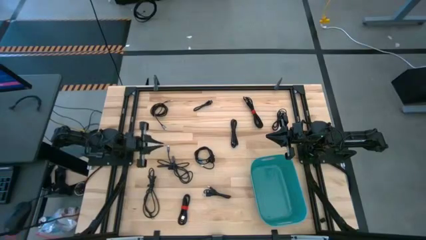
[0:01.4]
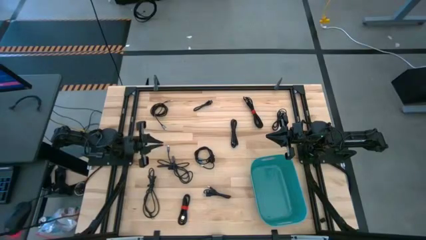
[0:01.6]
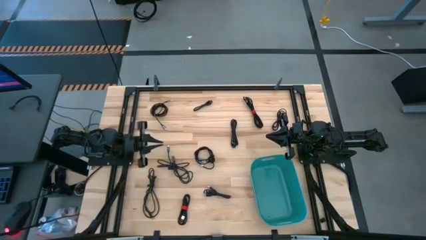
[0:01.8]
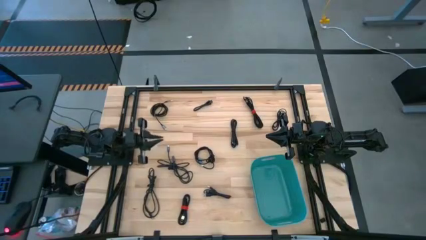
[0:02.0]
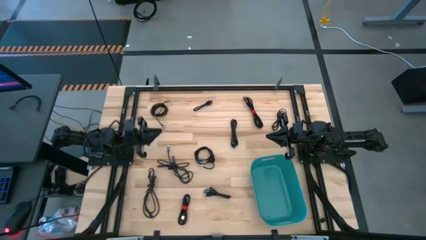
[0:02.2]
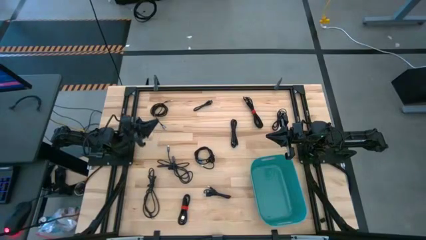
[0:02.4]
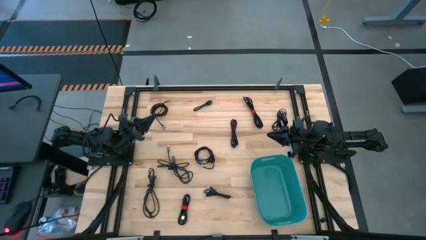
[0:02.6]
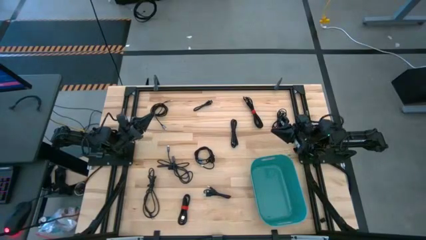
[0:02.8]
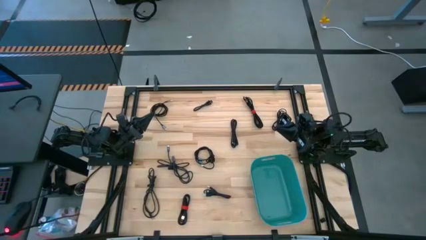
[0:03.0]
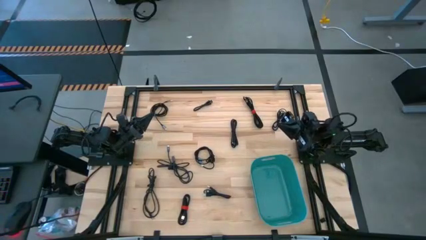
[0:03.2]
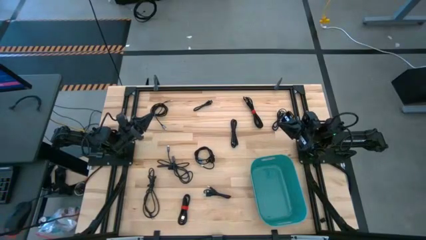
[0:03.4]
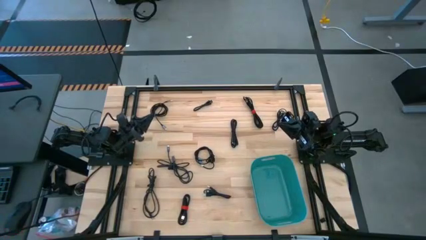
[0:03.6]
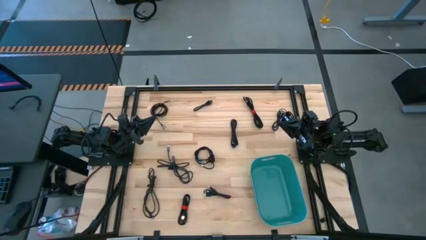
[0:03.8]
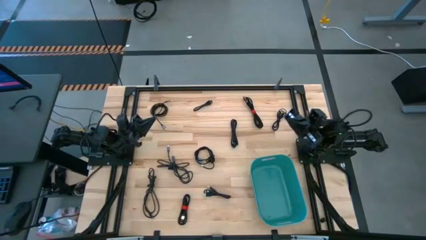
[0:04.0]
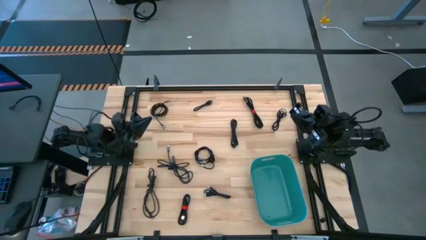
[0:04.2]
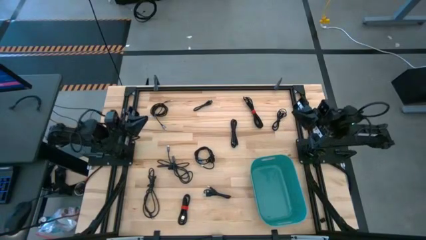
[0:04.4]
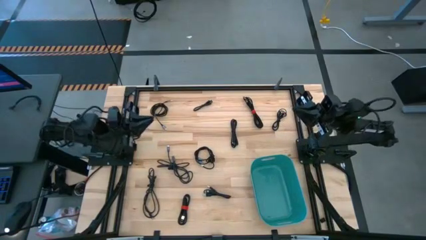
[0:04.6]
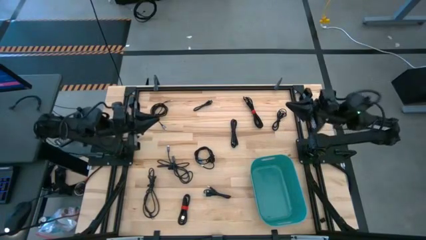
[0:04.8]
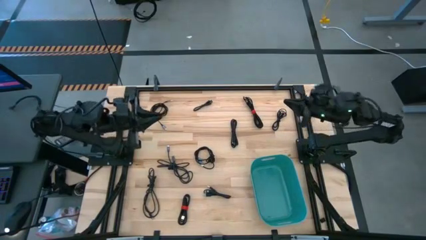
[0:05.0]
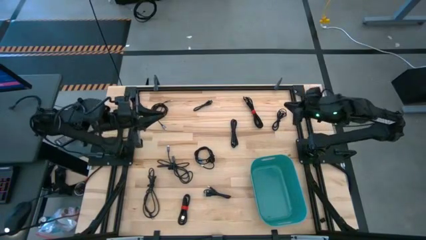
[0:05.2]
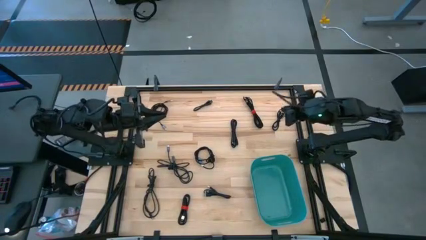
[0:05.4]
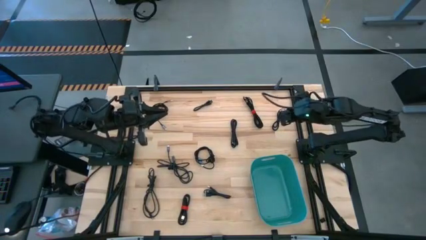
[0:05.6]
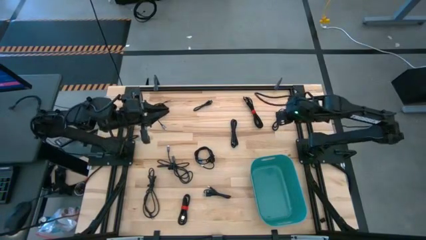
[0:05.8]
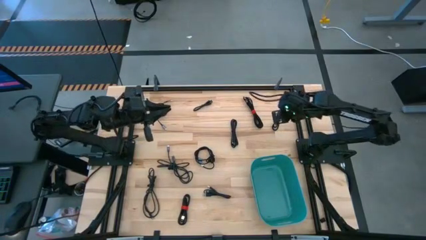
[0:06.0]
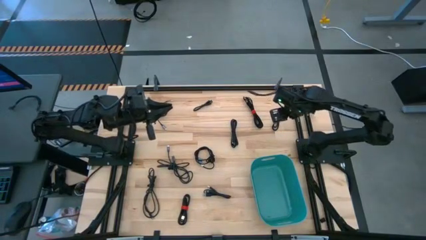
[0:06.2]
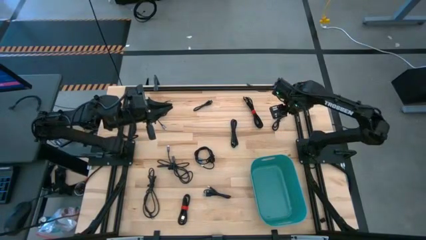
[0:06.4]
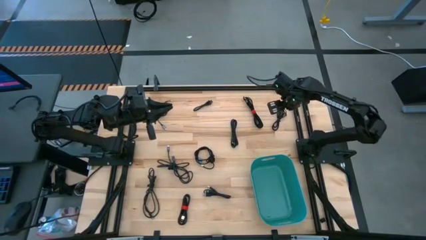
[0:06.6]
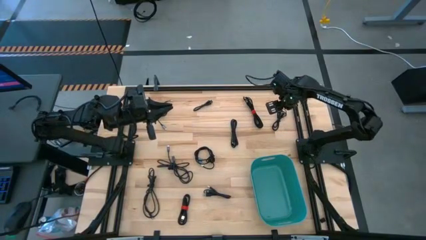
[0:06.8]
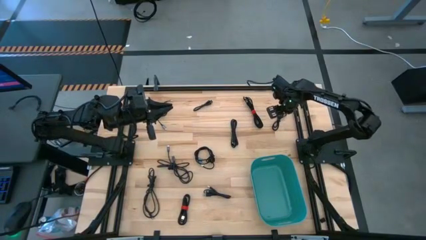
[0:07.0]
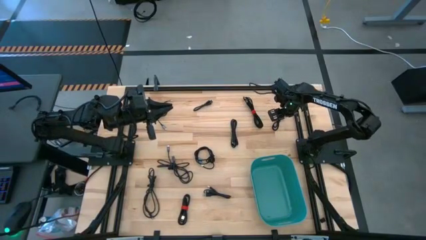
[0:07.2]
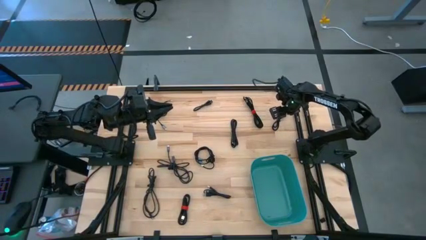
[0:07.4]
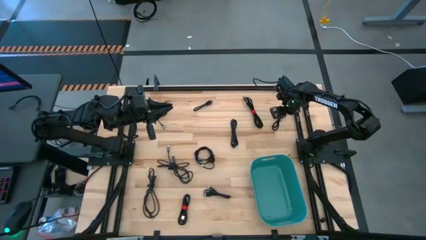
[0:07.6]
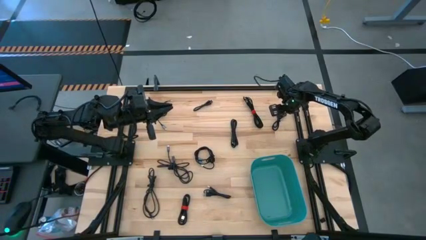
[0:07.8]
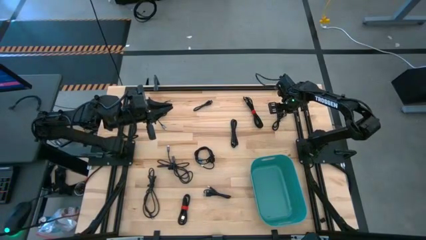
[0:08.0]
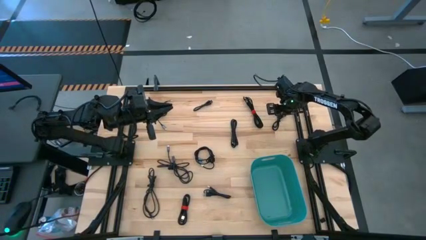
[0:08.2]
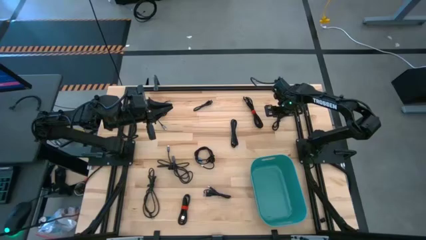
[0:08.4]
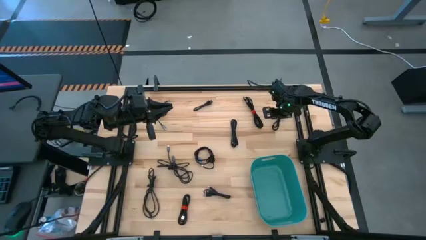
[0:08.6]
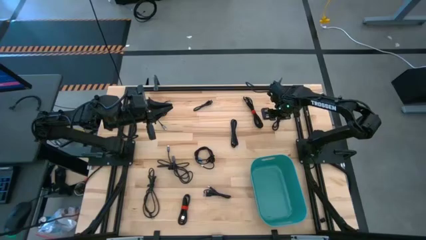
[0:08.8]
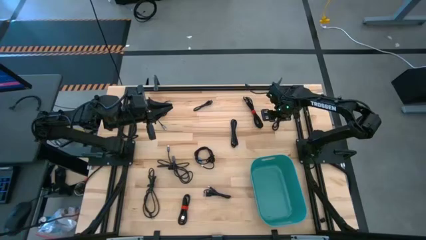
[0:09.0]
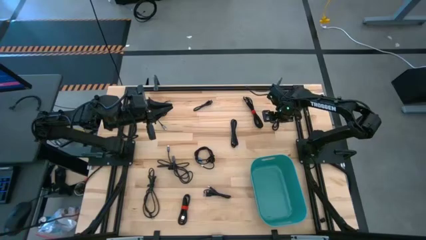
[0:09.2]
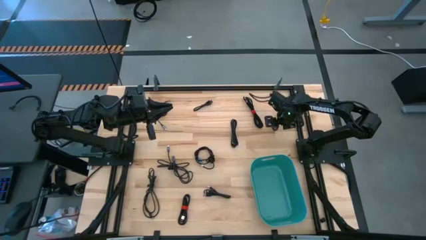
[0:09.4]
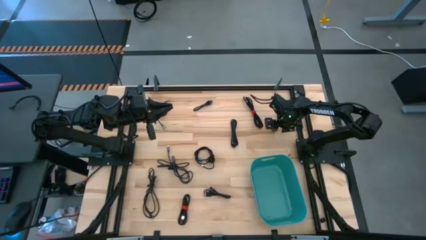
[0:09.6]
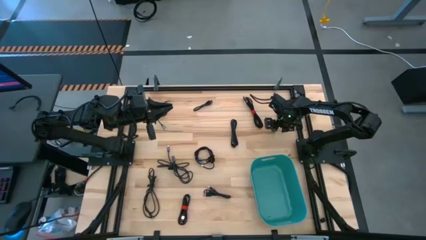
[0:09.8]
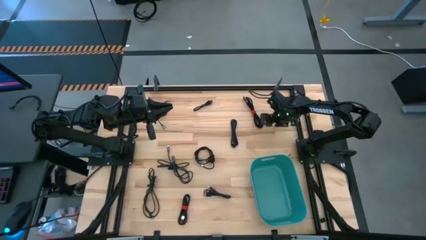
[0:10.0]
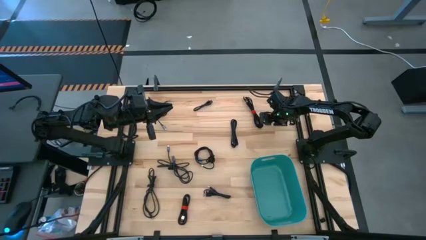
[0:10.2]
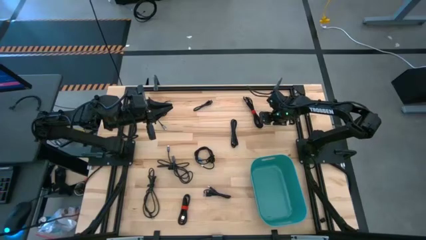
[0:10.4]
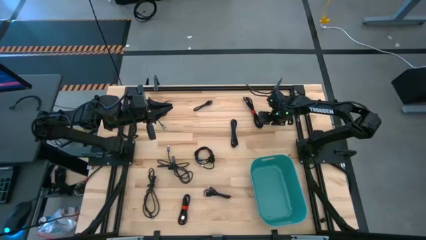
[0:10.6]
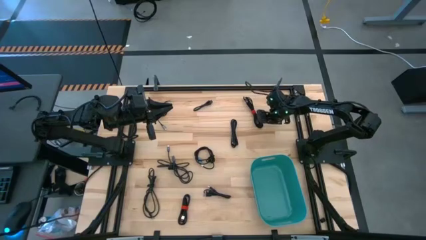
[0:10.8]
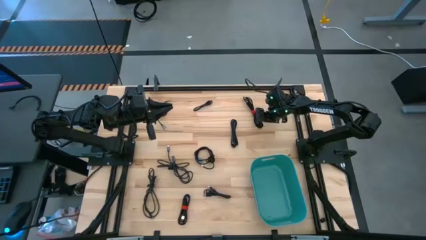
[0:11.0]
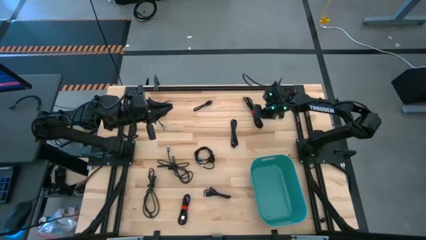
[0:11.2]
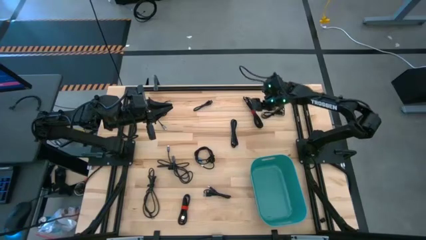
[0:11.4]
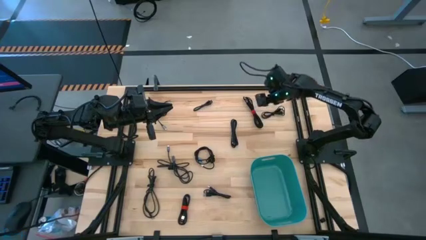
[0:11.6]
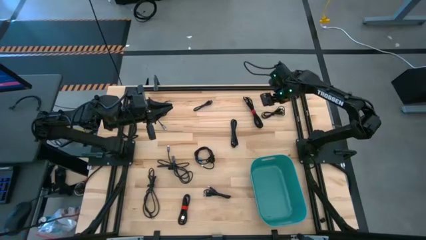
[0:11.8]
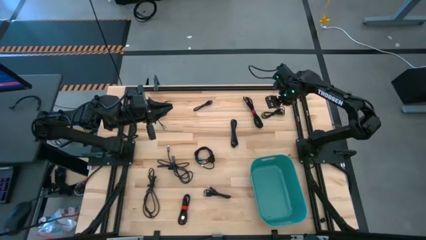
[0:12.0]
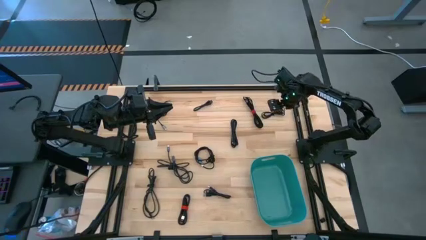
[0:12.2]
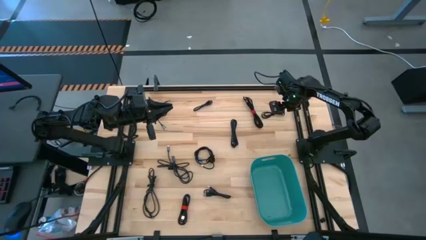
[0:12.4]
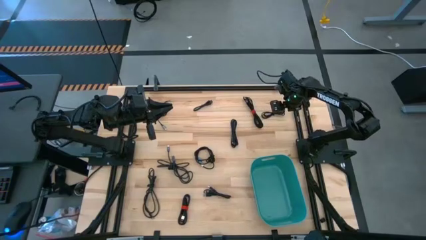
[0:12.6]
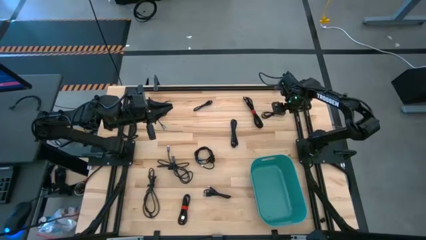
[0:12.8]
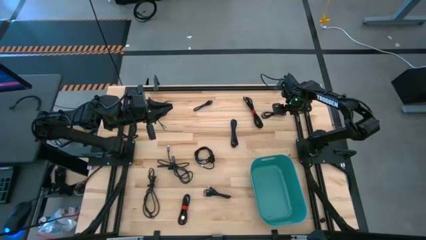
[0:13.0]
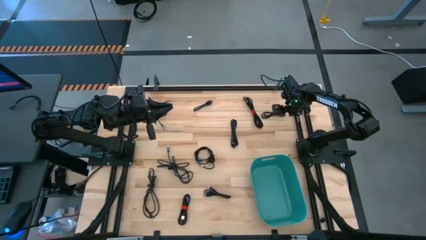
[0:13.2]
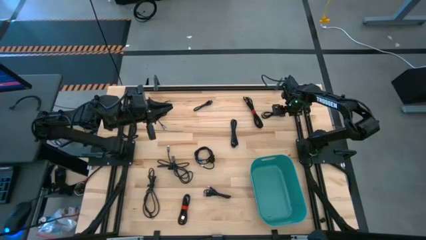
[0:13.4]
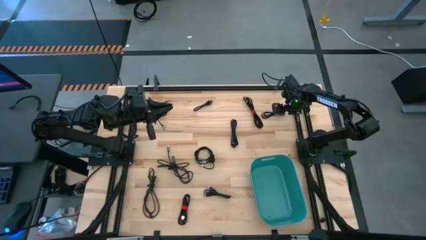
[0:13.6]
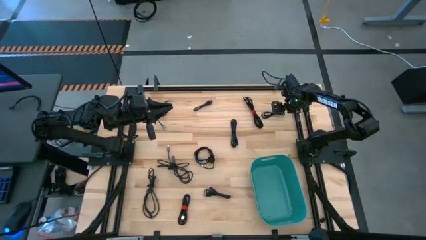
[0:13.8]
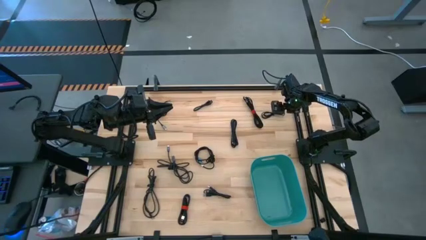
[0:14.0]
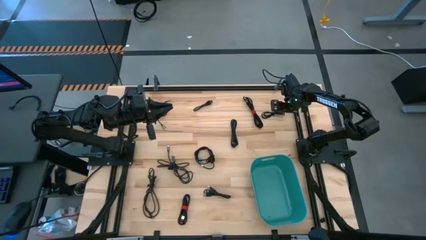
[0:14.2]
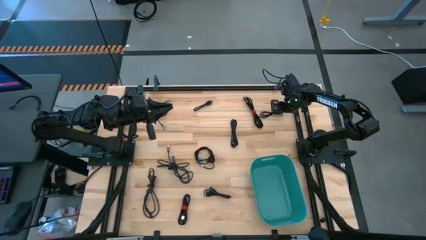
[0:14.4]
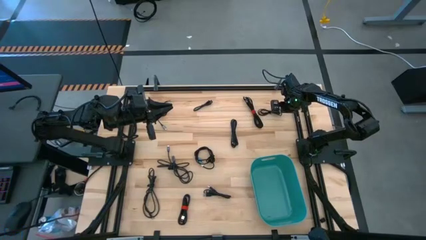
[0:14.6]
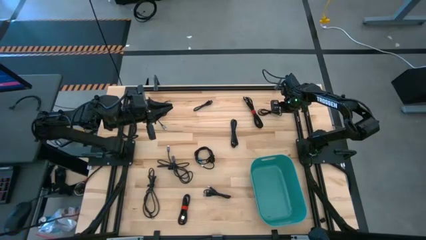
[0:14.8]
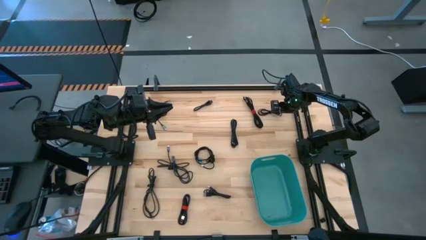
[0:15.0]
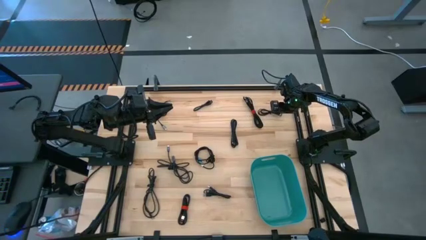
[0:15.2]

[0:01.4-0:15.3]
Task: Pick and place USB-C Cables
Put the black charger cable into the green bin
